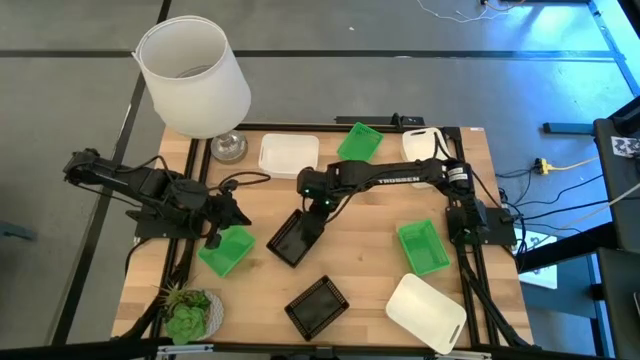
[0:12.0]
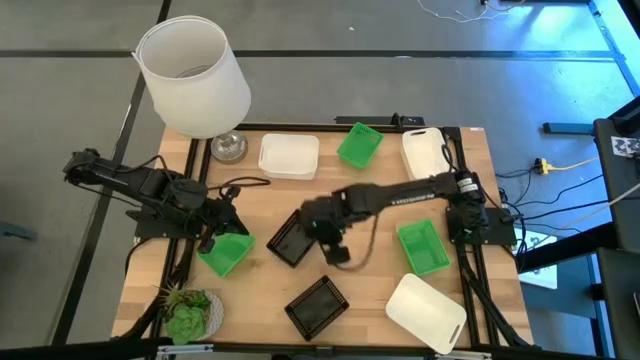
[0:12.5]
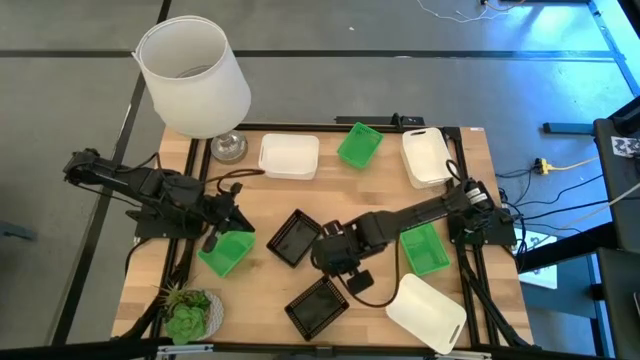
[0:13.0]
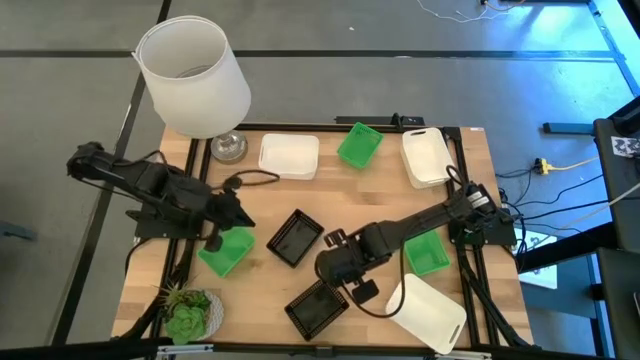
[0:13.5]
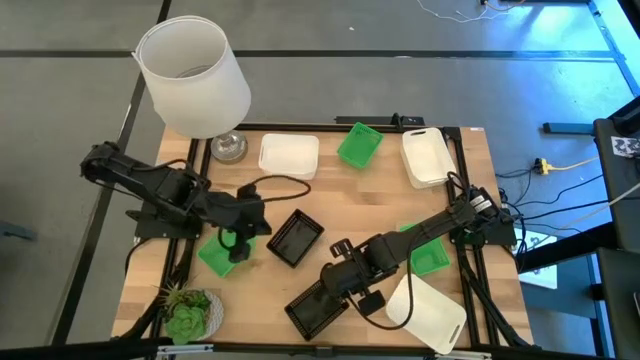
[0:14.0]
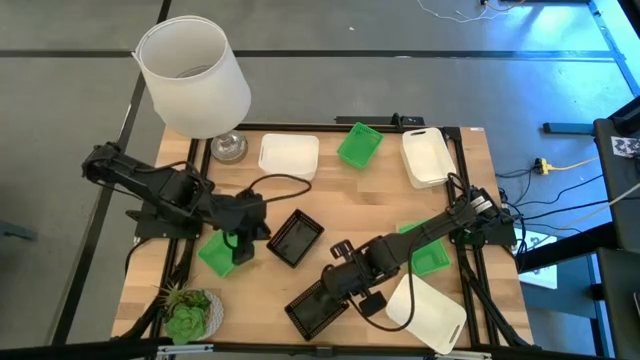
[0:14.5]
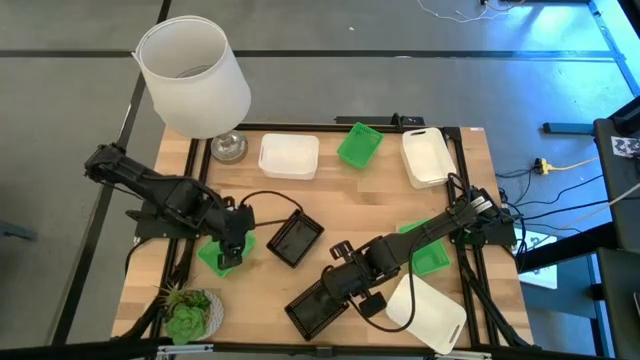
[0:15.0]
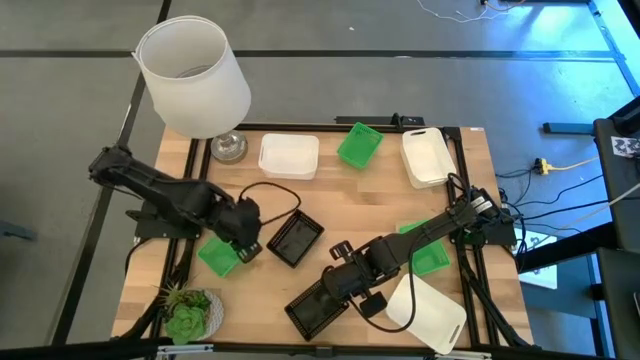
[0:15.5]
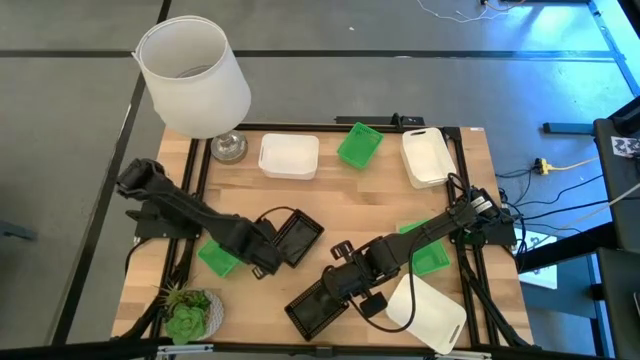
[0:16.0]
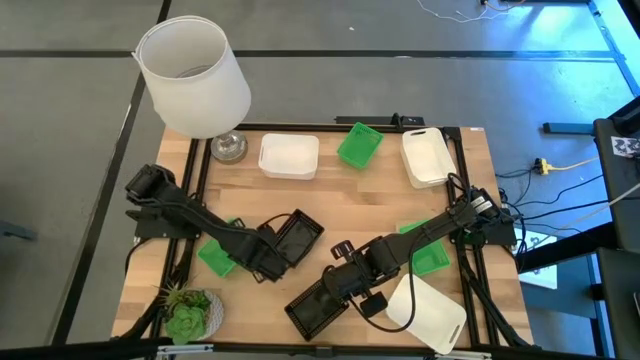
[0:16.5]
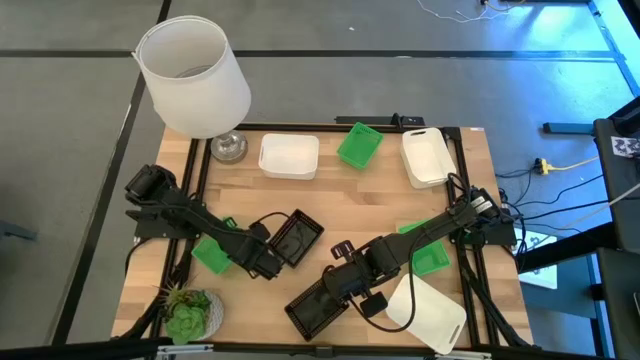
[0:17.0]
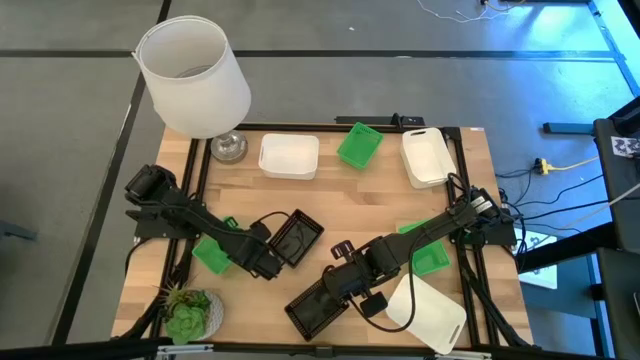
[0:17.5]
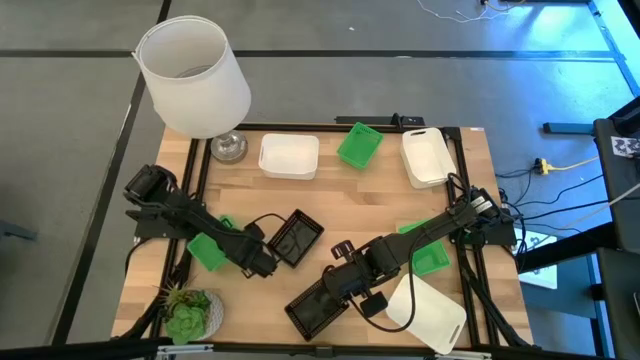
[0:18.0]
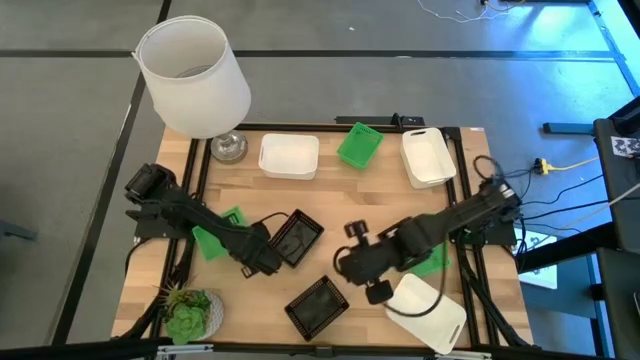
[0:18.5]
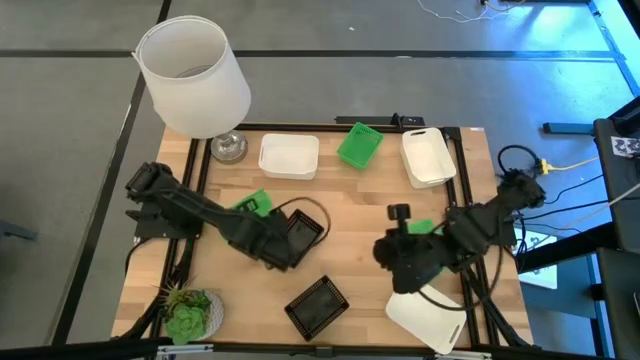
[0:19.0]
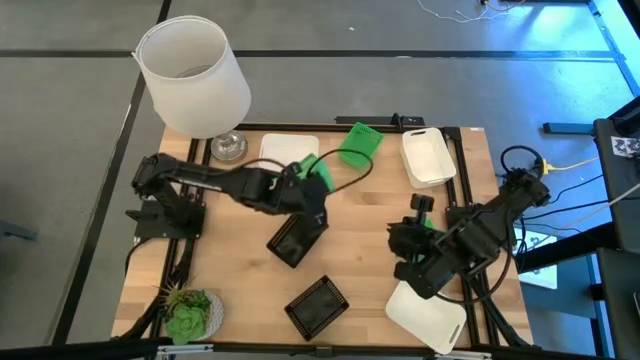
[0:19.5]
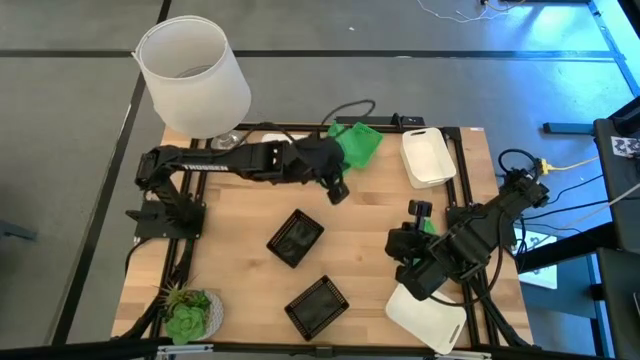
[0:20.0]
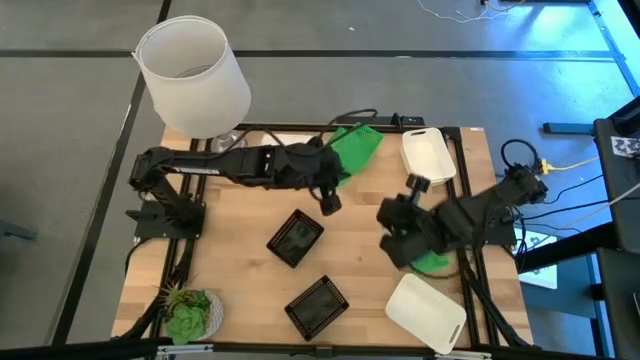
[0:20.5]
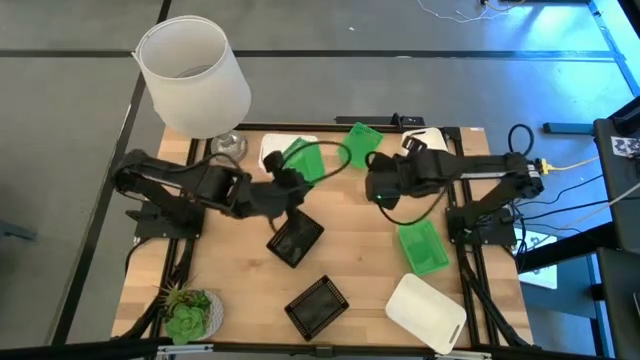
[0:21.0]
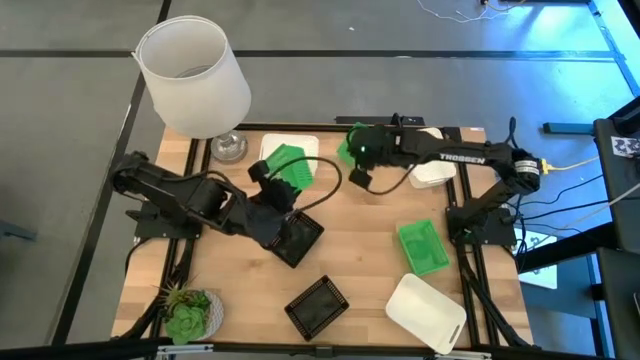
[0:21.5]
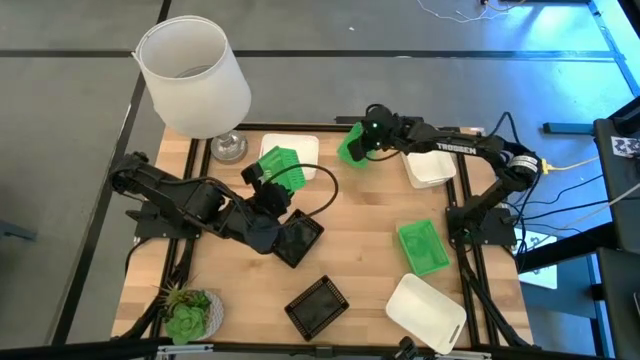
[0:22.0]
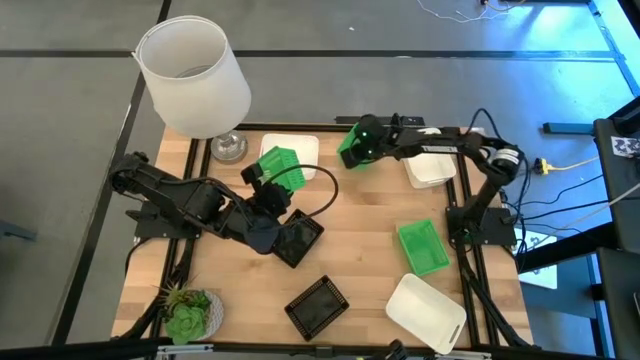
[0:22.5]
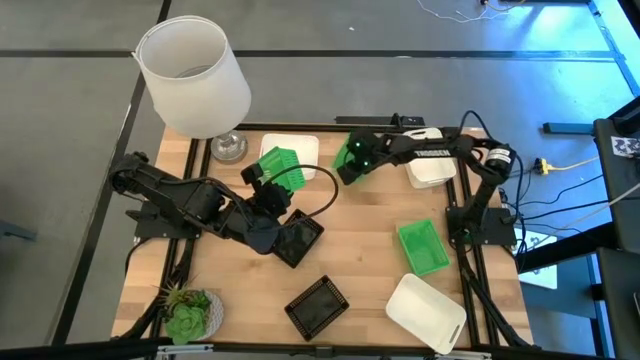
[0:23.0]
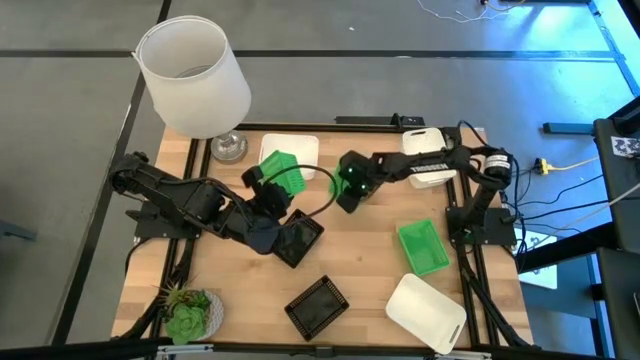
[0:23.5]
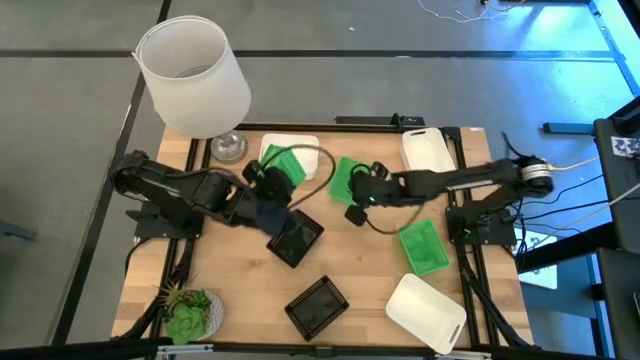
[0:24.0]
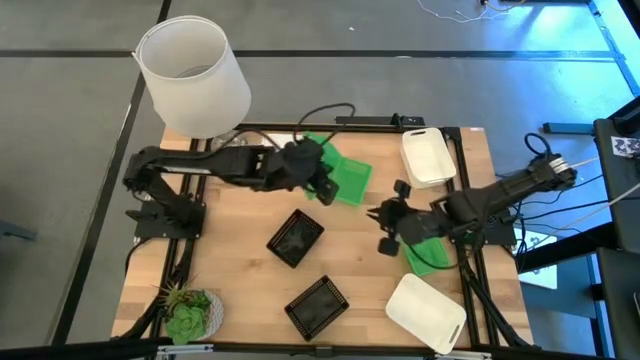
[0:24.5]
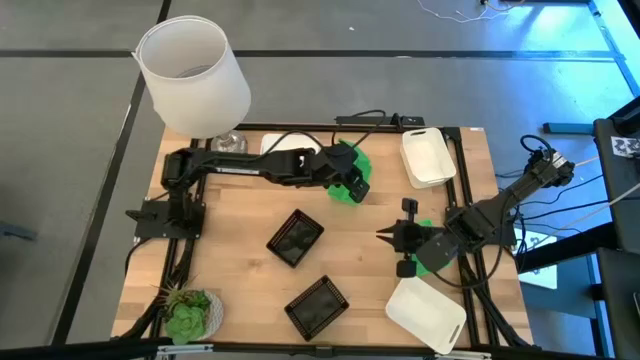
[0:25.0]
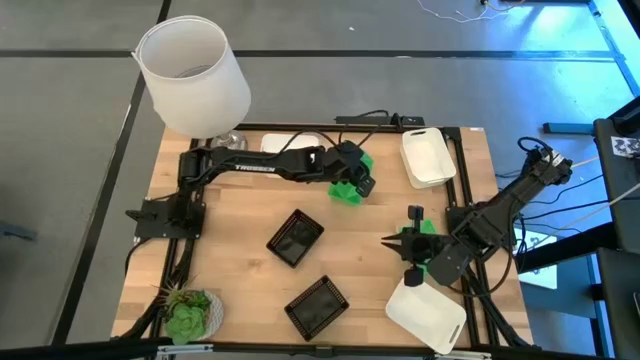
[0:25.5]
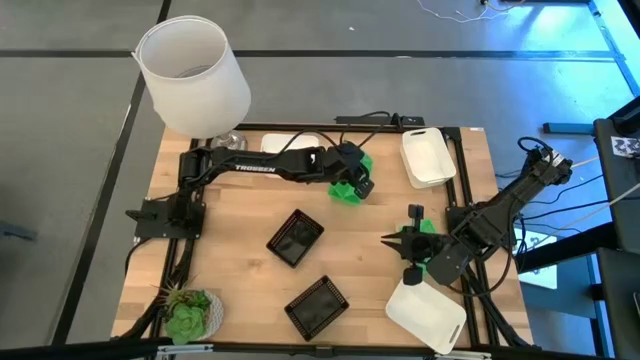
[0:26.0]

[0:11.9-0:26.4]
Stack the bottom left green bin on the top green bin

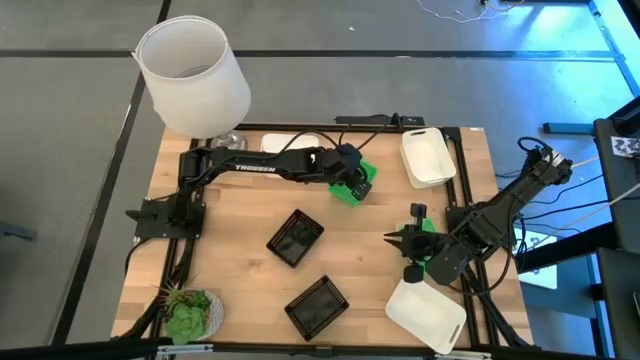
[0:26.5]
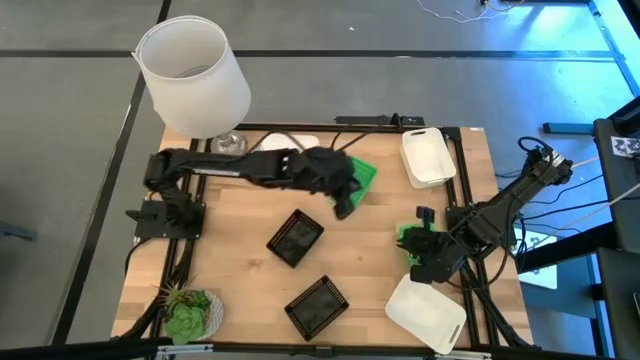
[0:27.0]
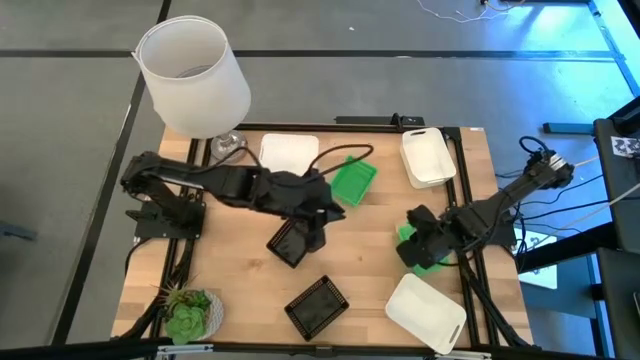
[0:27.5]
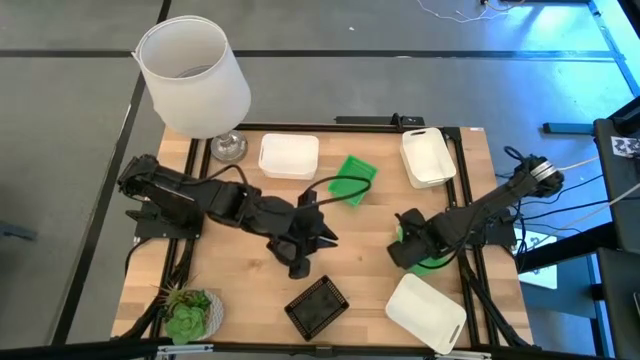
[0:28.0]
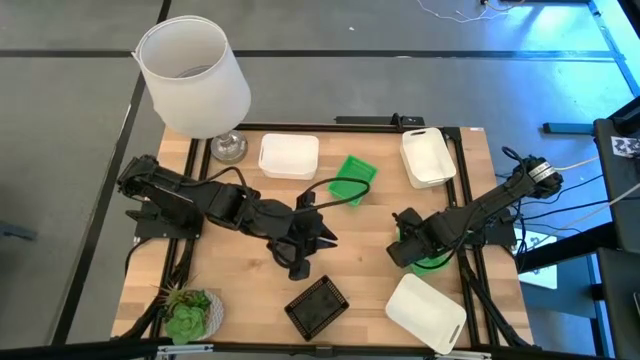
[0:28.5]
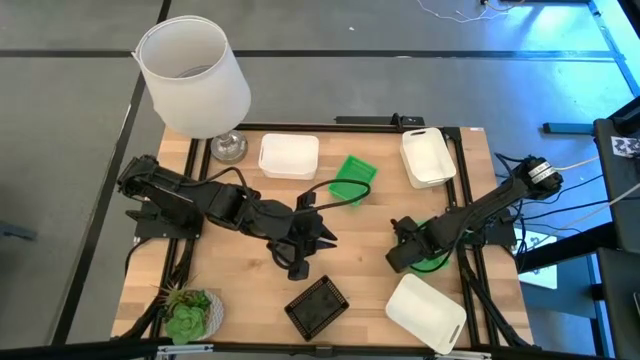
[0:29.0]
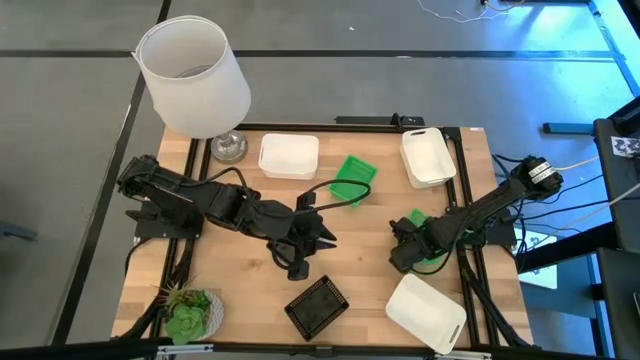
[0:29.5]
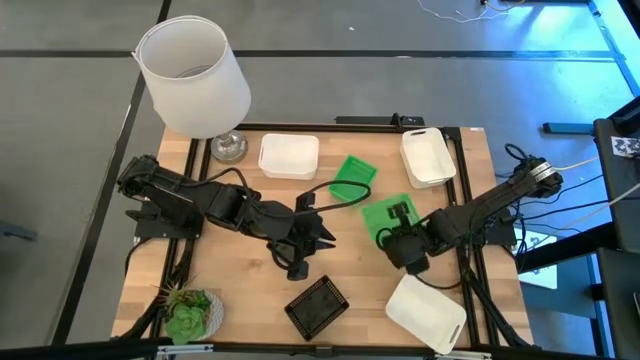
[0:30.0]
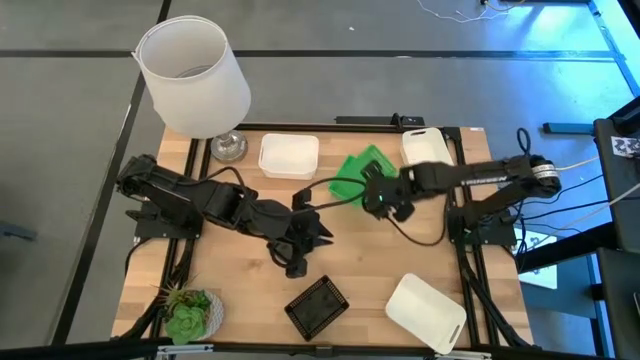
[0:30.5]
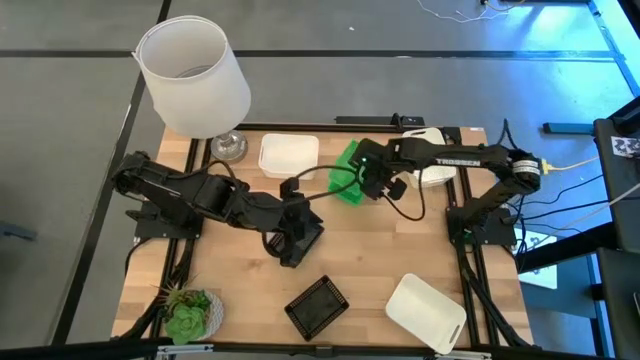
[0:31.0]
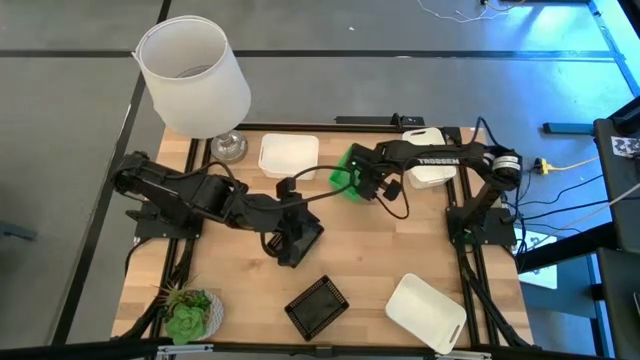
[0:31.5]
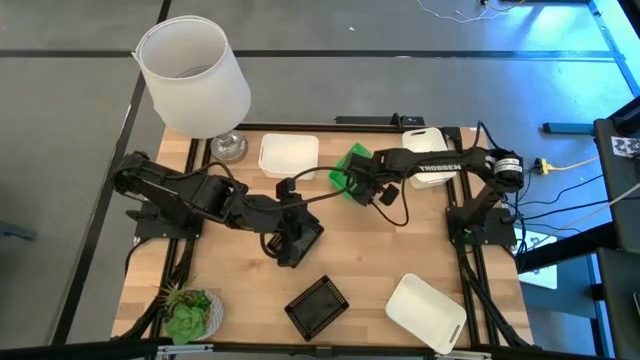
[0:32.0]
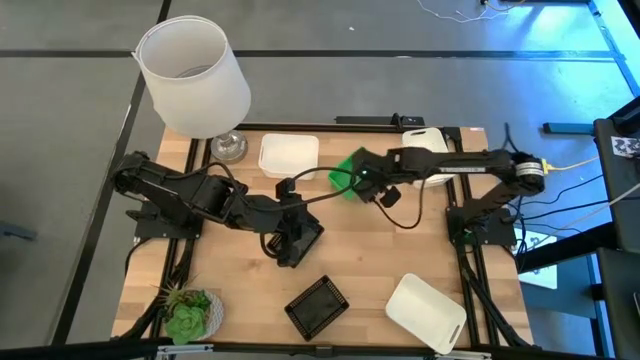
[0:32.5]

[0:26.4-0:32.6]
Stack the bottom green bin on the stacked green bins
